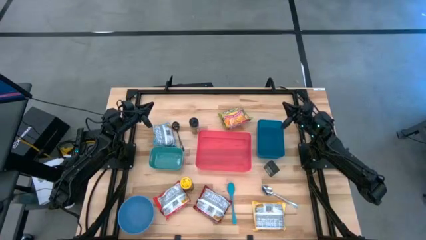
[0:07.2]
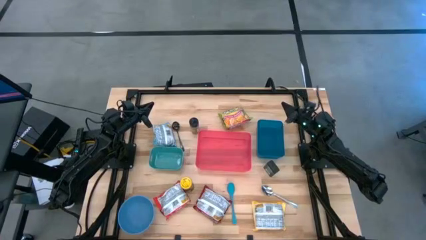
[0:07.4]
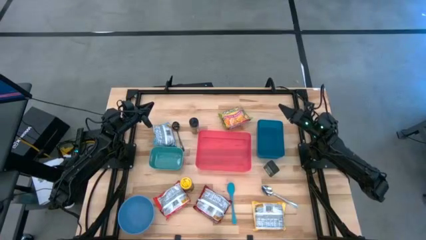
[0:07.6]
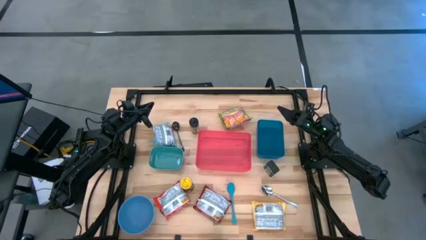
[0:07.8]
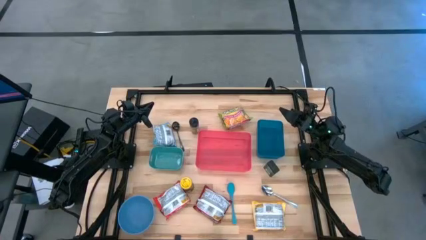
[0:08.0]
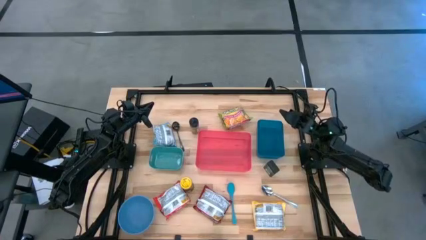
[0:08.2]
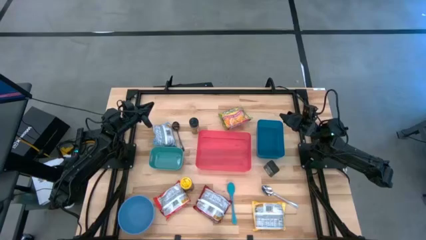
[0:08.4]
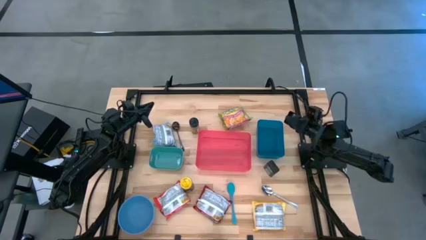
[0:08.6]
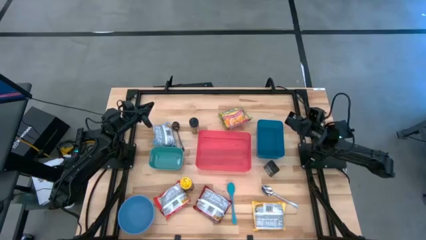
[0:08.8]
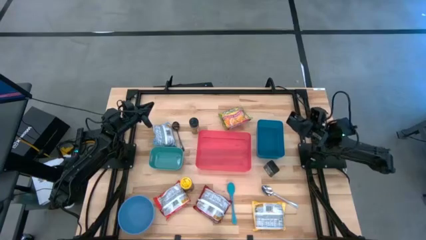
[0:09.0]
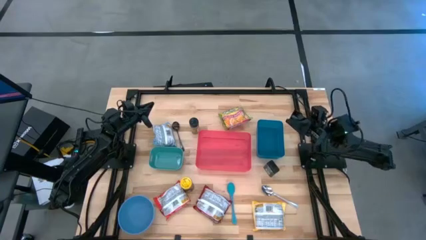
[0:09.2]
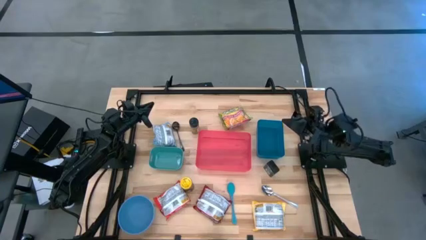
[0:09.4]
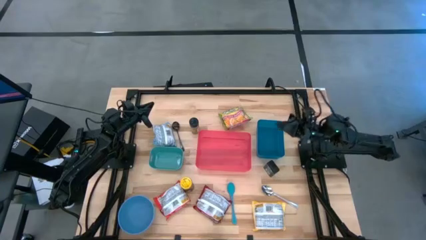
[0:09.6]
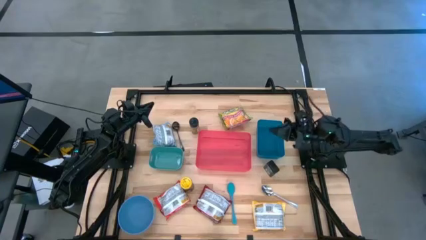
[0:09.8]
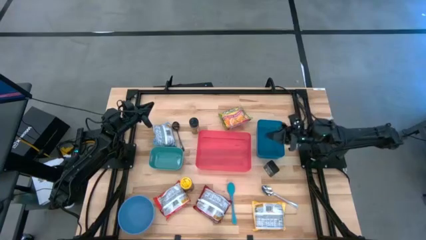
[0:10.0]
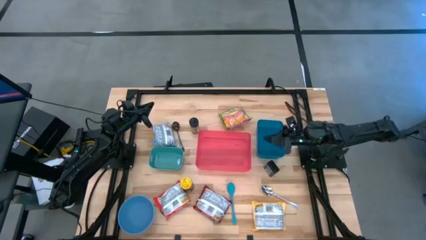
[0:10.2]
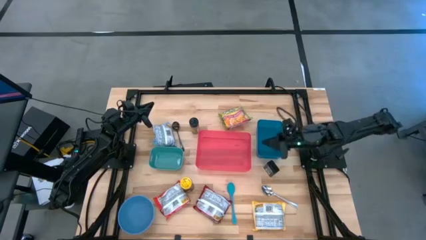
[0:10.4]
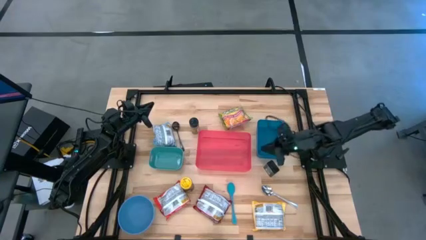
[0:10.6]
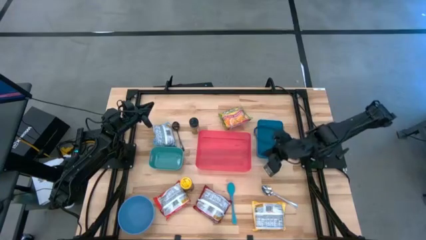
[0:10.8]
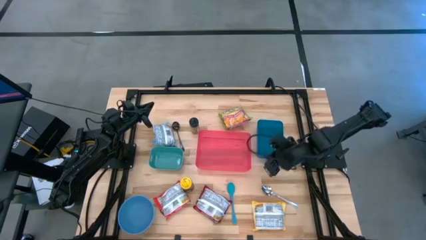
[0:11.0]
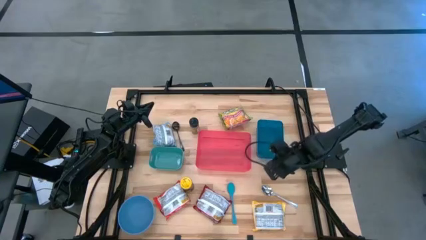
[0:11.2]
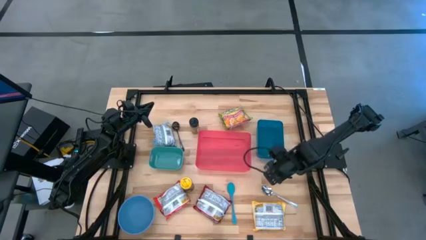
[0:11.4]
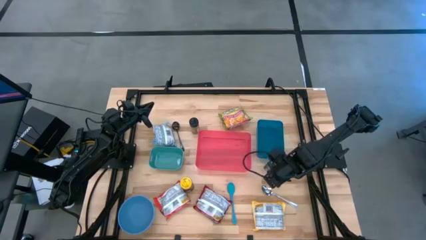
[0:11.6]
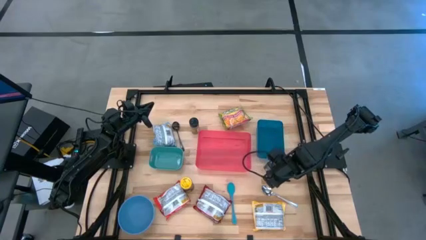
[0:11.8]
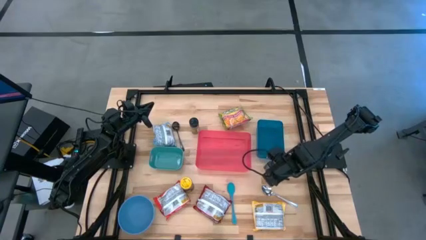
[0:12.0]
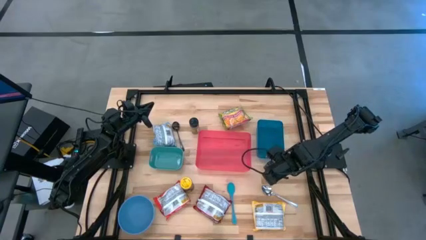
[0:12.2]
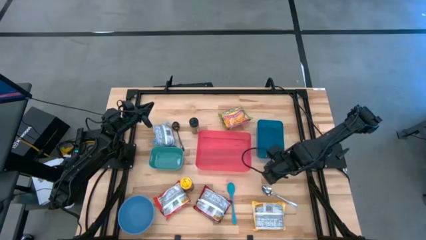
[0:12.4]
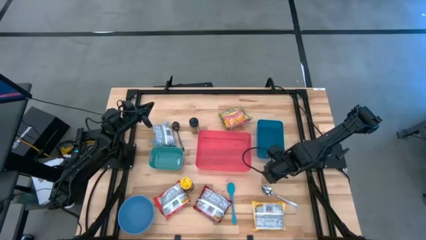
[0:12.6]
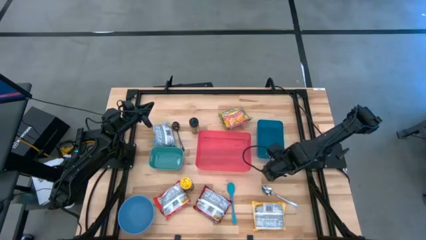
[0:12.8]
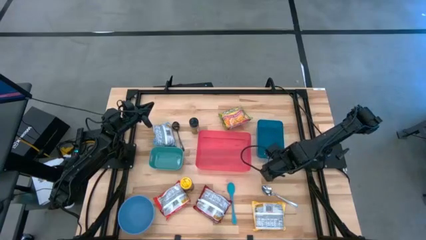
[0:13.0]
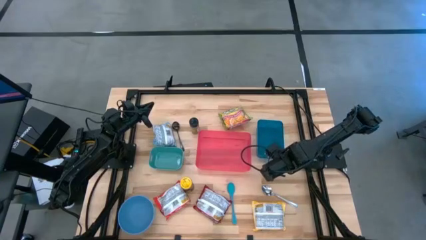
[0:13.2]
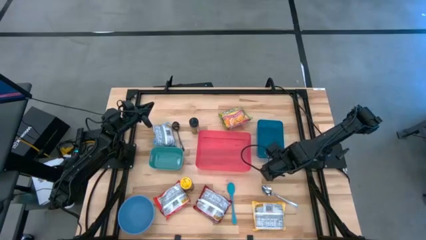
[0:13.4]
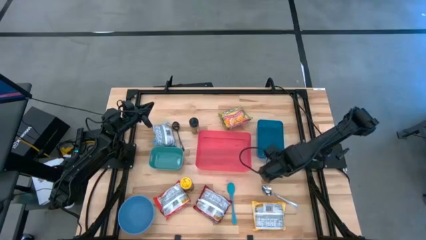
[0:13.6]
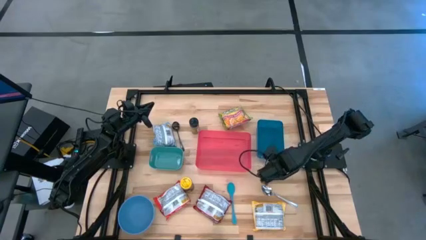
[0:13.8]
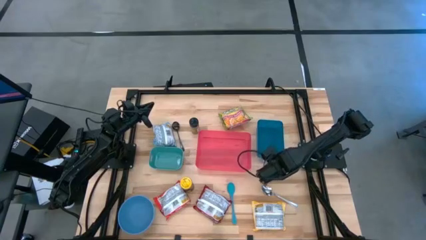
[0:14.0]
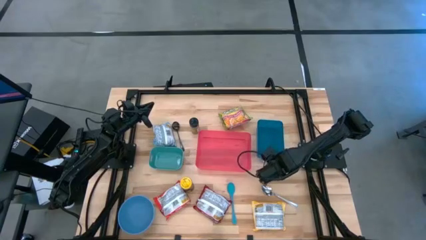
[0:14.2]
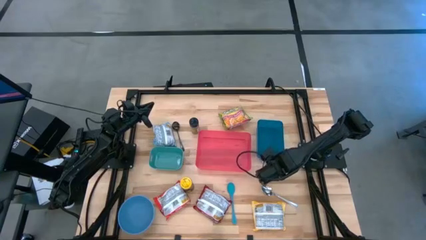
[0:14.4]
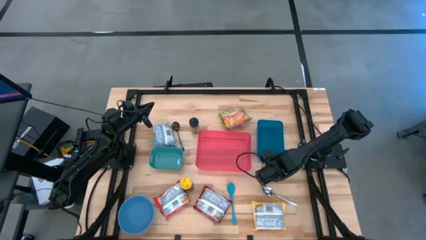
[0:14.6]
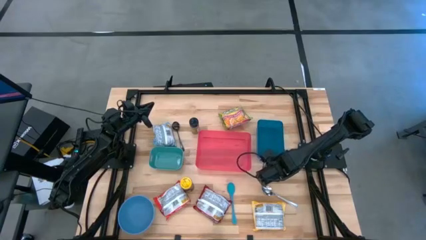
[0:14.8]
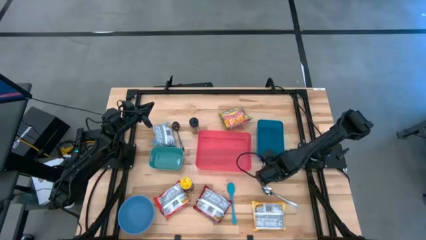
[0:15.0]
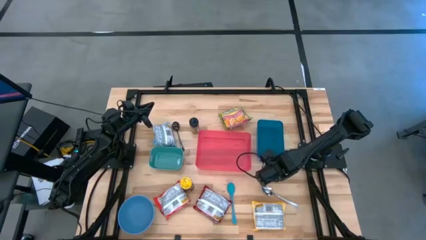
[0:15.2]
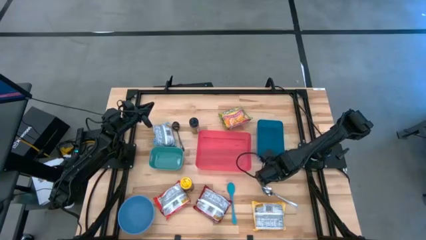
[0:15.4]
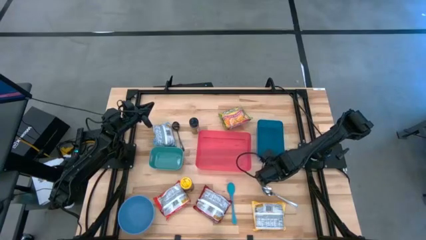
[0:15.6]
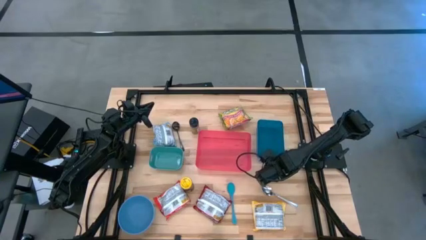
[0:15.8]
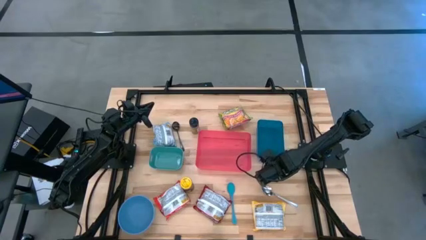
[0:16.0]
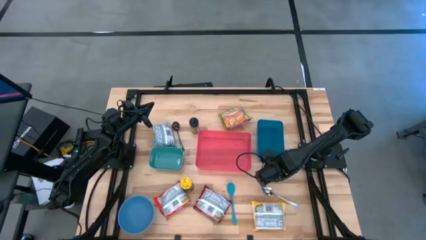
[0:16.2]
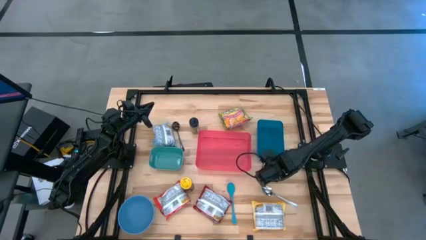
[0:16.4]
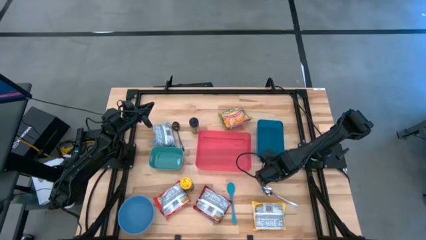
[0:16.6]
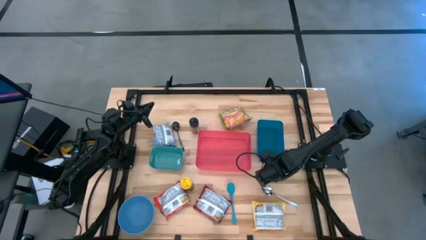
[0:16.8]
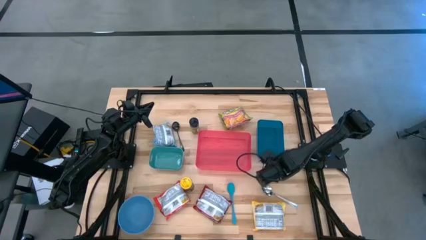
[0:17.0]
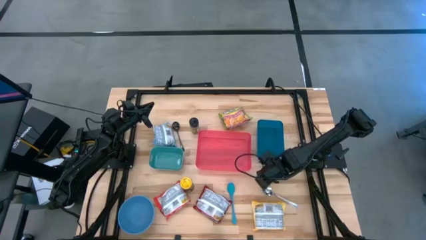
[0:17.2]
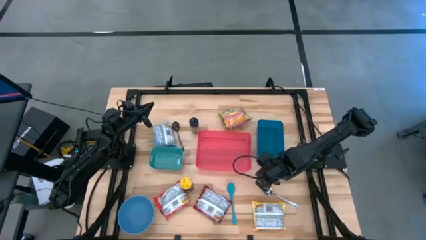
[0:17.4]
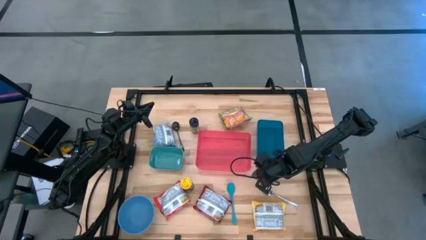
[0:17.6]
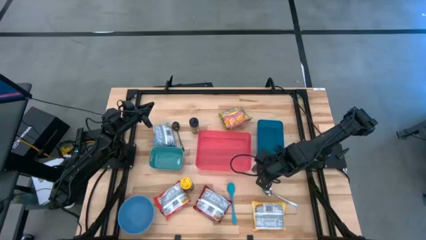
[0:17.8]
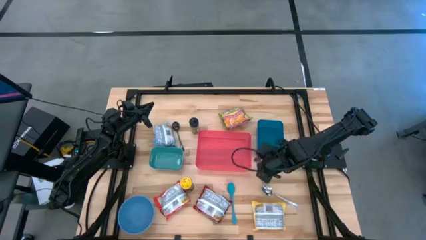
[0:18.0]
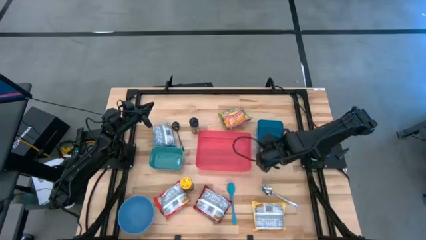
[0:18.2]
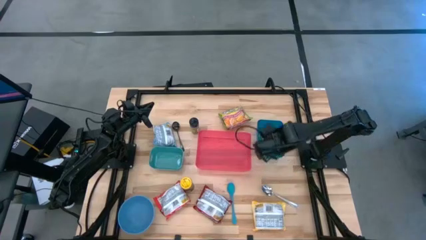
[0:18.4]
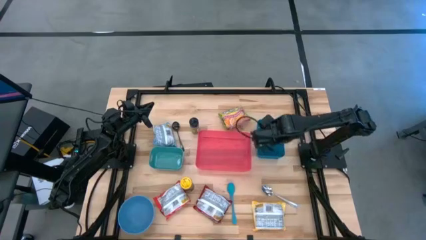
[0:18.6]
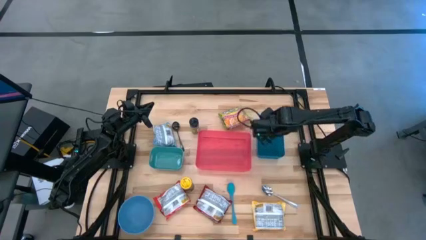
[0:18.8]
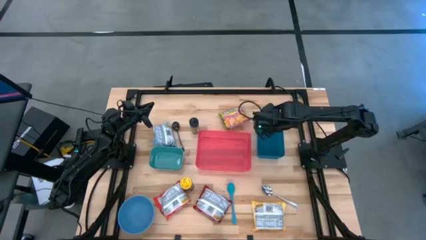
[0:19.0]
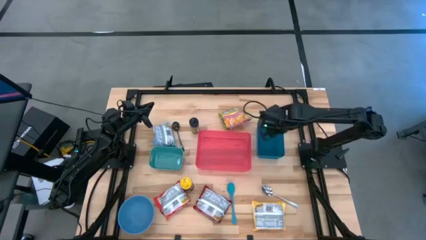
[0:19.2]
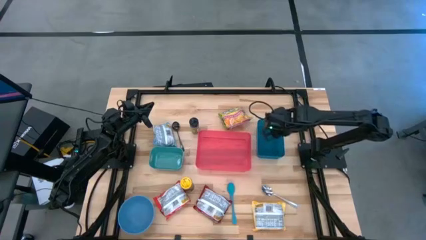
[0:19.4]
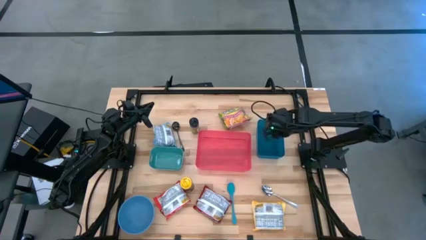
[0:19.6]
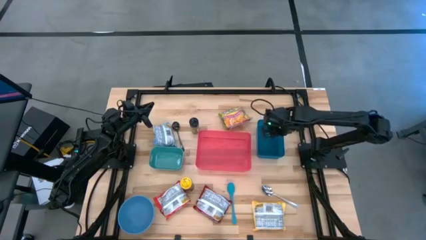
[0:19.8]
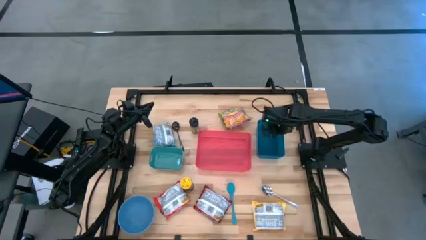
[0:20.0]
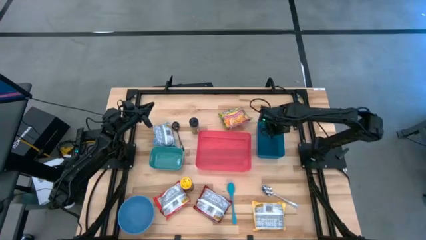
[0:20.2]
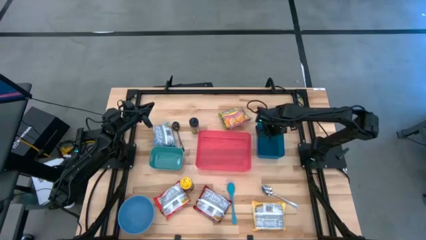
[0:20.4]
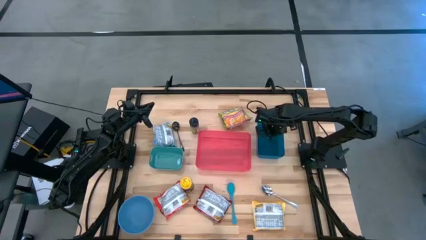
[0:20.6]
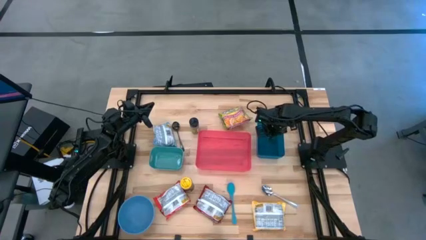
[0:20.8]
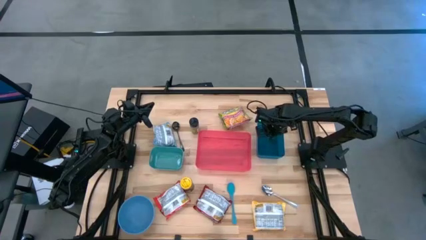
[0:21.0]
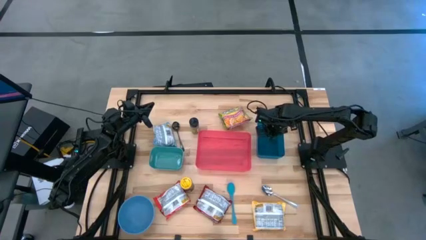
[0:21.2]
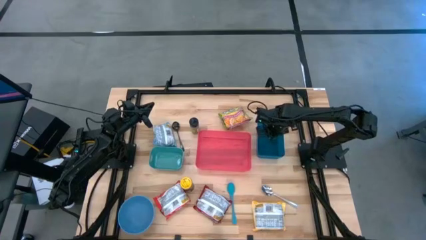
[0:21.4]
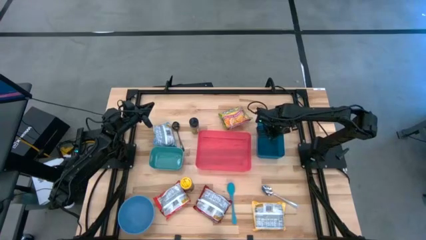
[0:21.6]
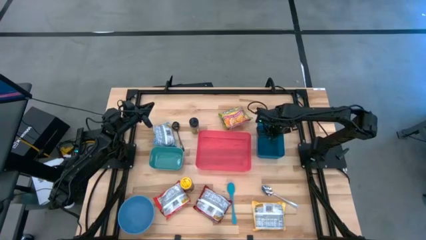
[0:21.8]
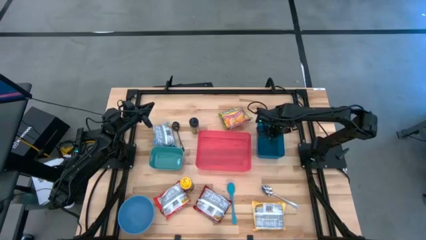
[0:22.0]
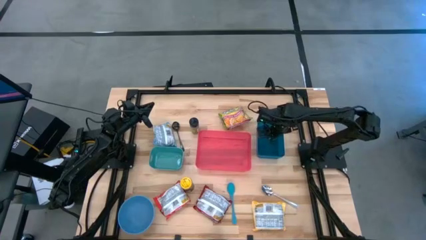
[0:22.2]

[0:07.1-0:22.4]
Task: Pick & Place Food Item
Put the black seasoning can into the blue bin
